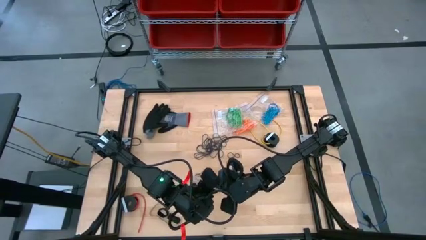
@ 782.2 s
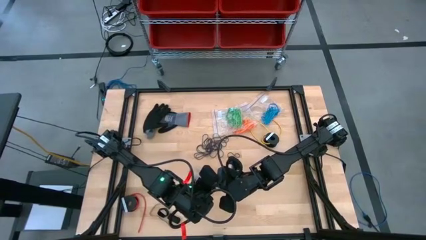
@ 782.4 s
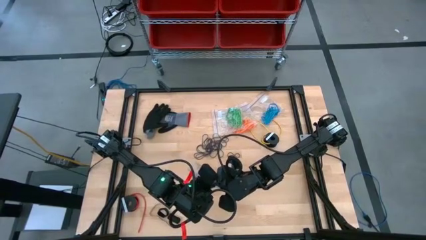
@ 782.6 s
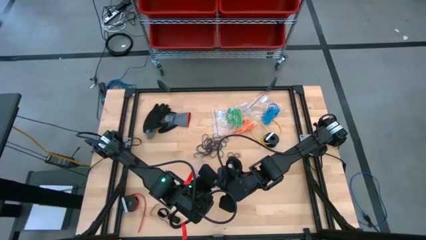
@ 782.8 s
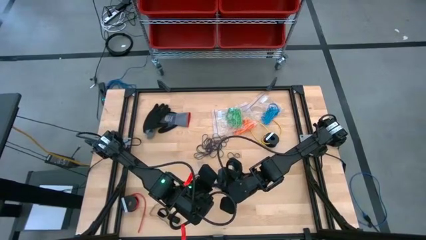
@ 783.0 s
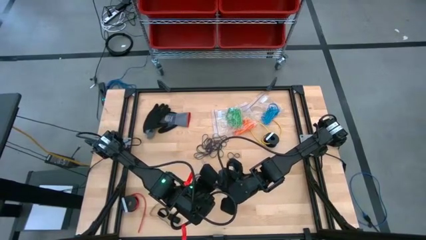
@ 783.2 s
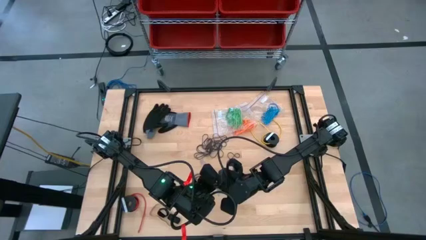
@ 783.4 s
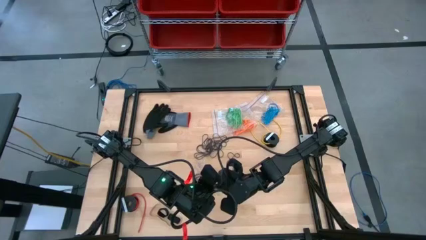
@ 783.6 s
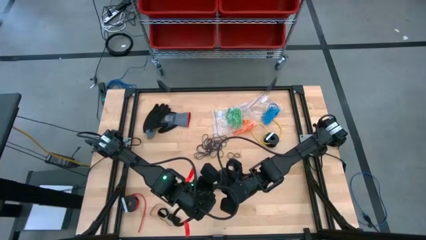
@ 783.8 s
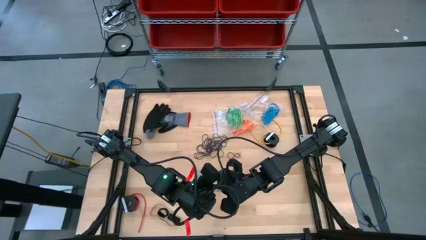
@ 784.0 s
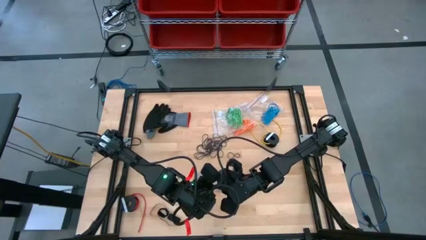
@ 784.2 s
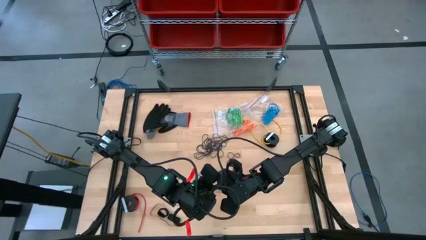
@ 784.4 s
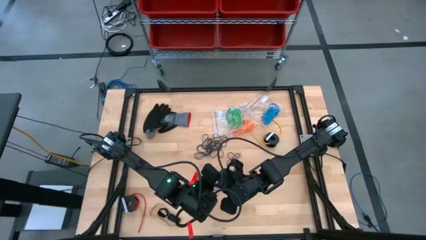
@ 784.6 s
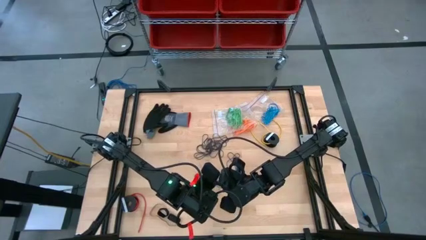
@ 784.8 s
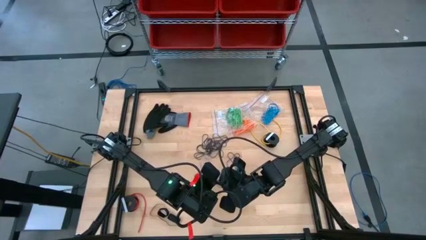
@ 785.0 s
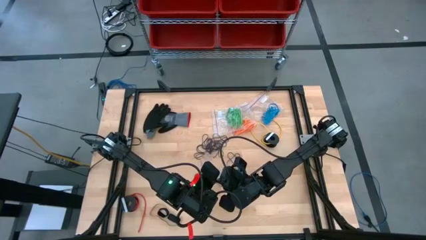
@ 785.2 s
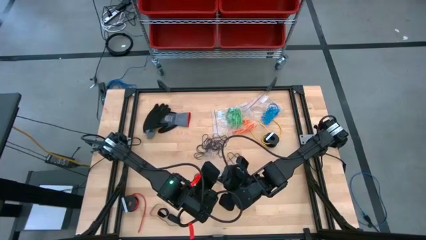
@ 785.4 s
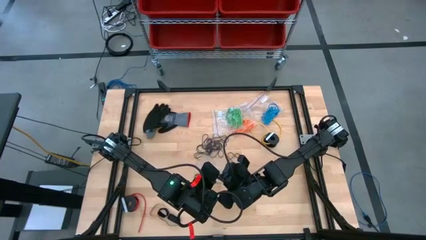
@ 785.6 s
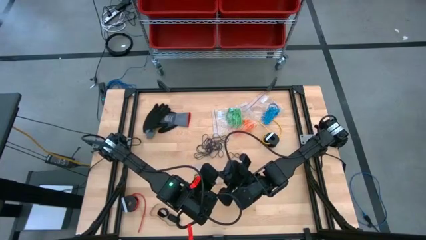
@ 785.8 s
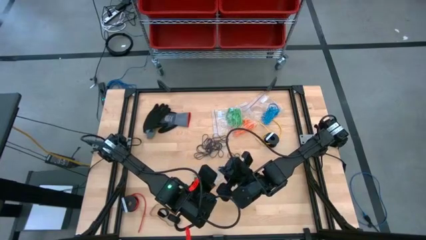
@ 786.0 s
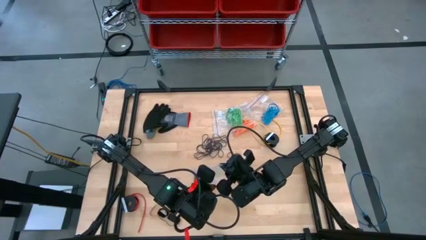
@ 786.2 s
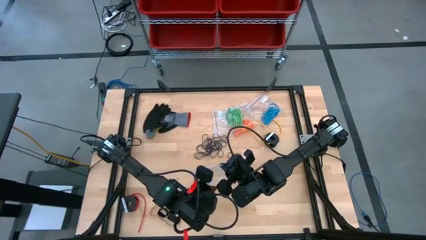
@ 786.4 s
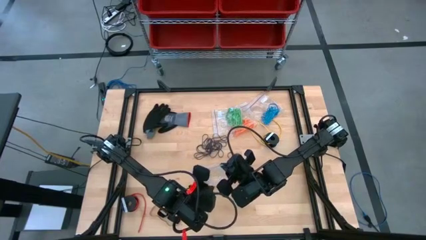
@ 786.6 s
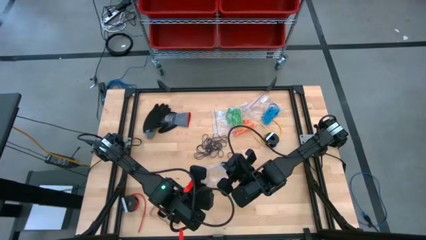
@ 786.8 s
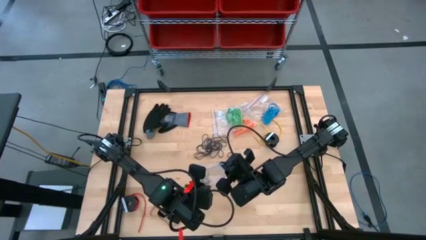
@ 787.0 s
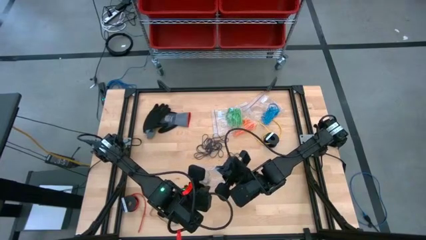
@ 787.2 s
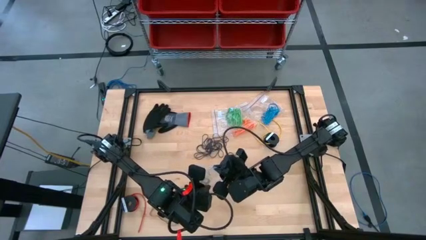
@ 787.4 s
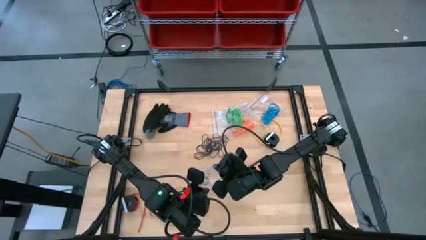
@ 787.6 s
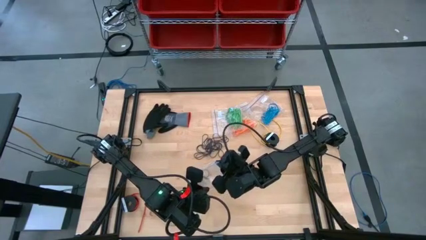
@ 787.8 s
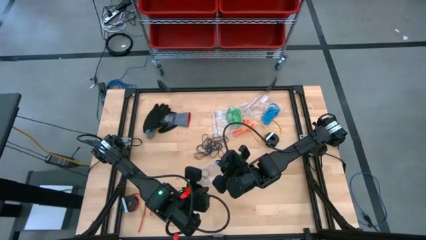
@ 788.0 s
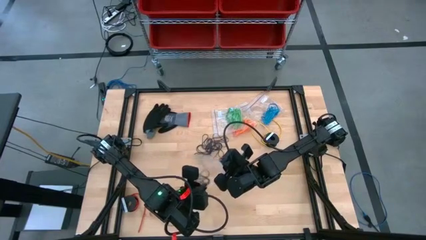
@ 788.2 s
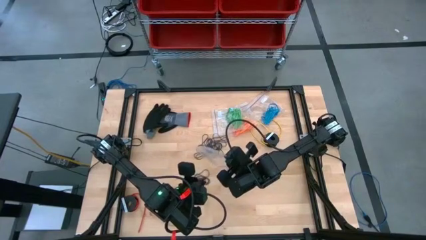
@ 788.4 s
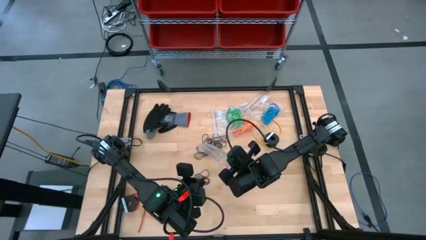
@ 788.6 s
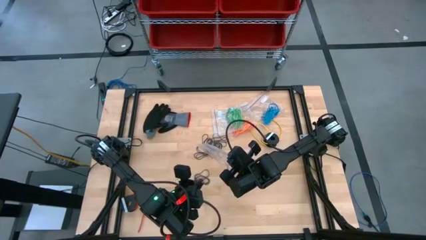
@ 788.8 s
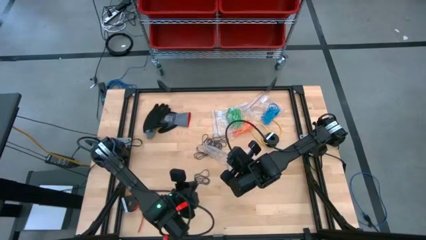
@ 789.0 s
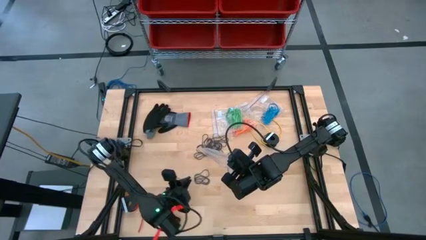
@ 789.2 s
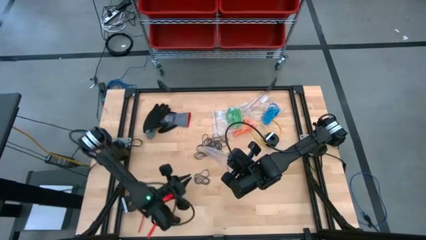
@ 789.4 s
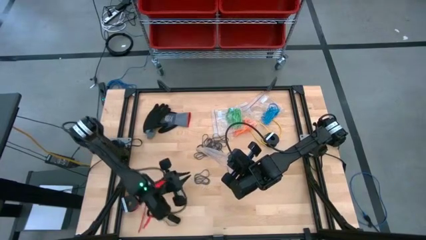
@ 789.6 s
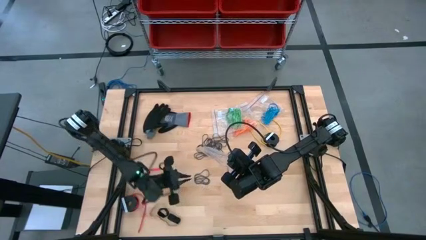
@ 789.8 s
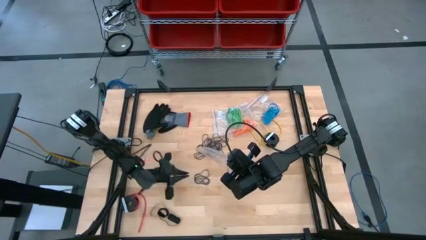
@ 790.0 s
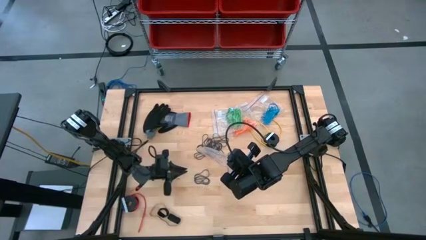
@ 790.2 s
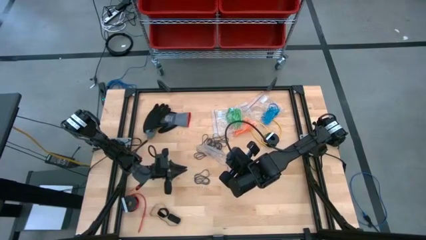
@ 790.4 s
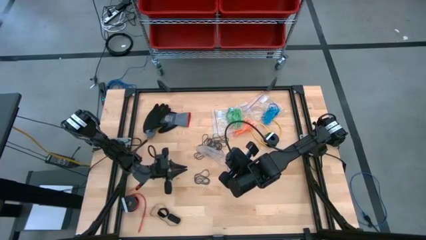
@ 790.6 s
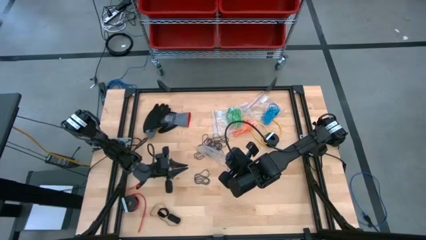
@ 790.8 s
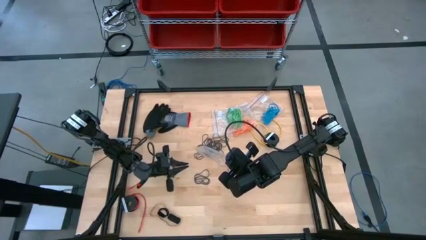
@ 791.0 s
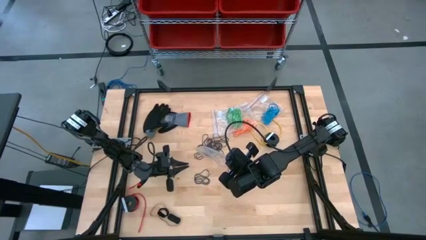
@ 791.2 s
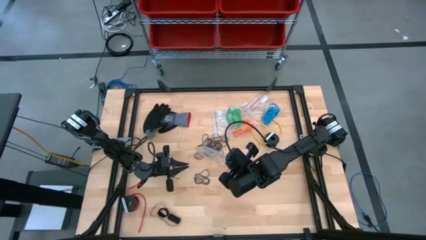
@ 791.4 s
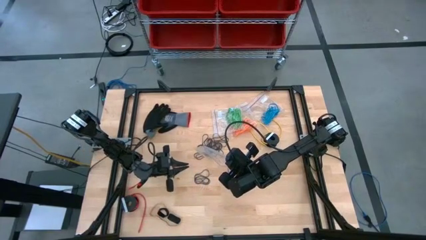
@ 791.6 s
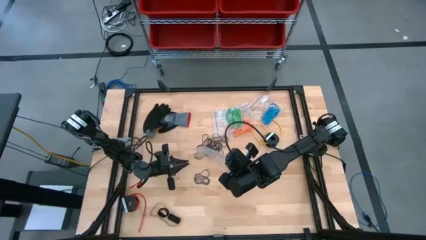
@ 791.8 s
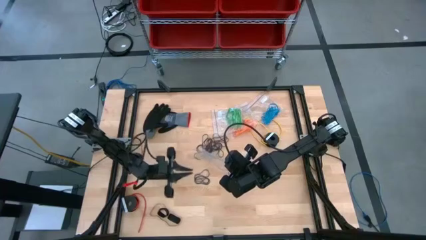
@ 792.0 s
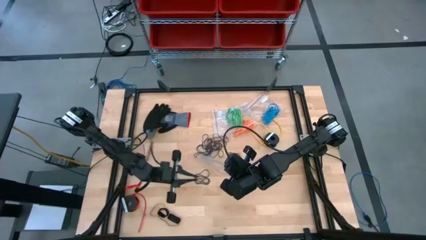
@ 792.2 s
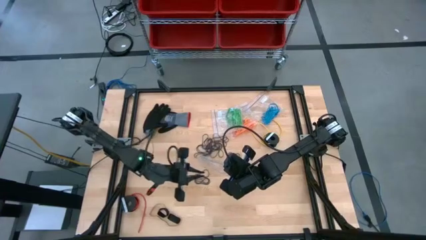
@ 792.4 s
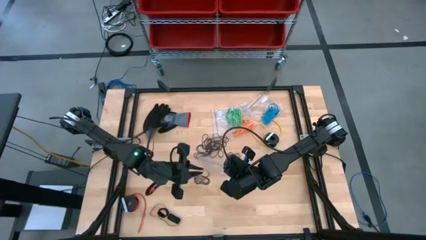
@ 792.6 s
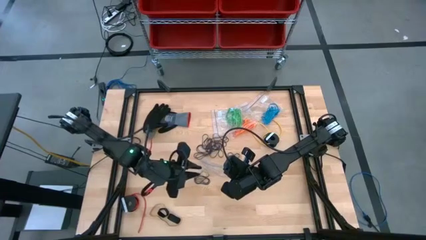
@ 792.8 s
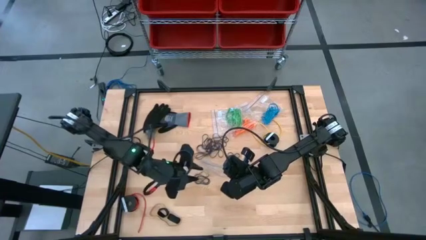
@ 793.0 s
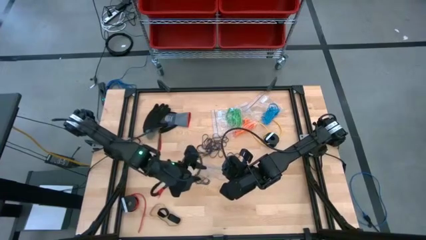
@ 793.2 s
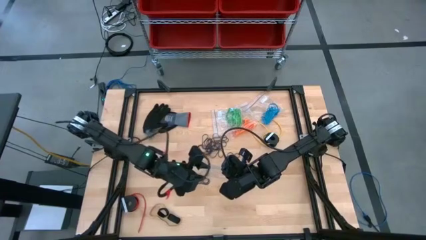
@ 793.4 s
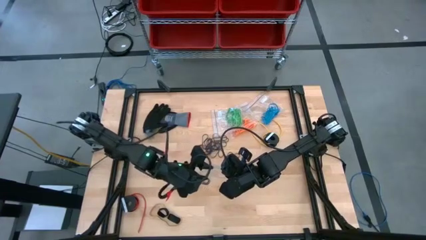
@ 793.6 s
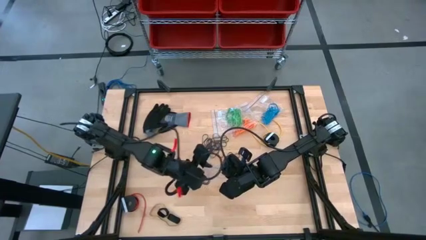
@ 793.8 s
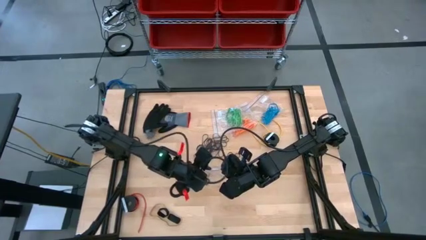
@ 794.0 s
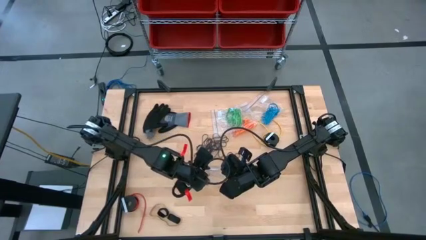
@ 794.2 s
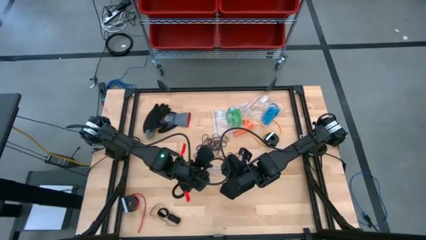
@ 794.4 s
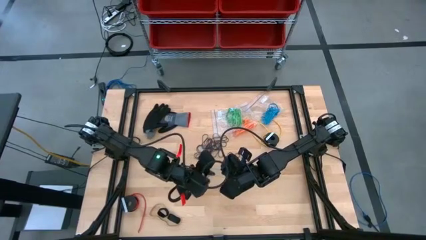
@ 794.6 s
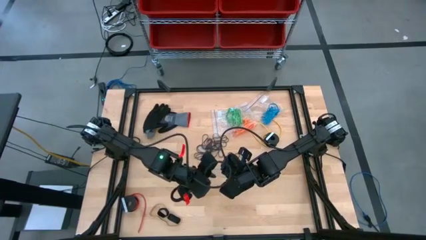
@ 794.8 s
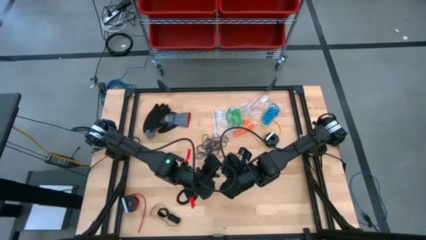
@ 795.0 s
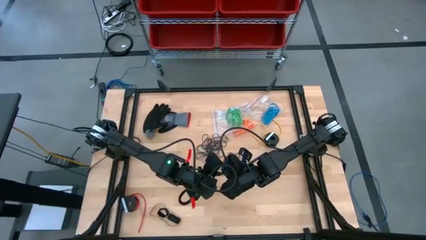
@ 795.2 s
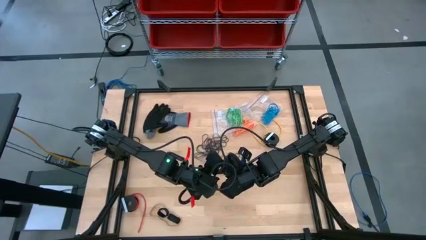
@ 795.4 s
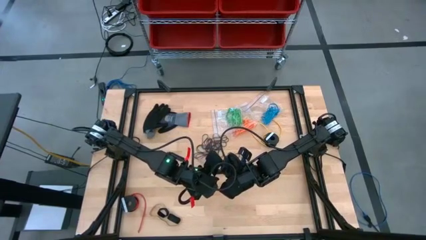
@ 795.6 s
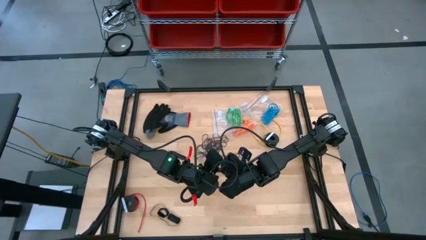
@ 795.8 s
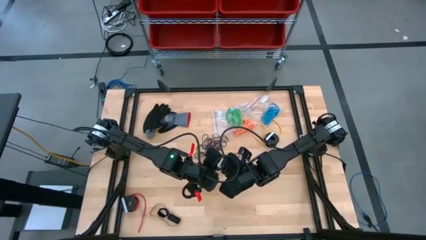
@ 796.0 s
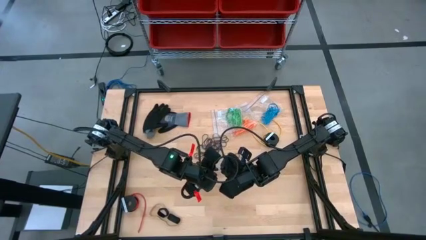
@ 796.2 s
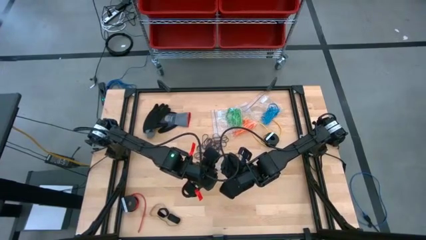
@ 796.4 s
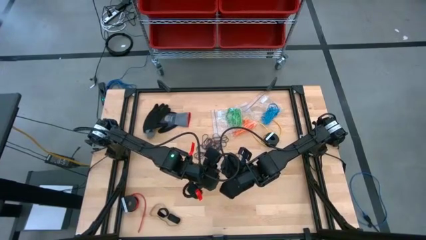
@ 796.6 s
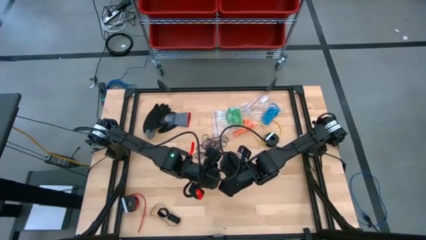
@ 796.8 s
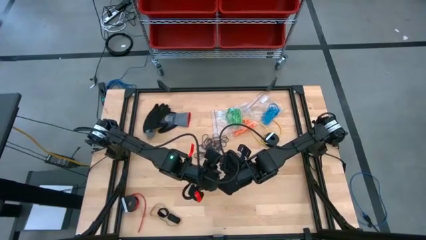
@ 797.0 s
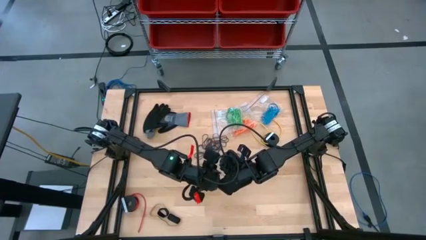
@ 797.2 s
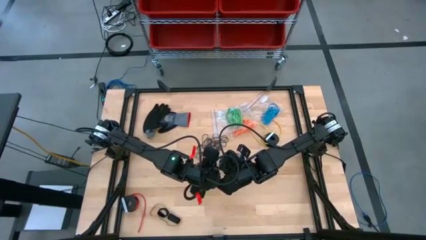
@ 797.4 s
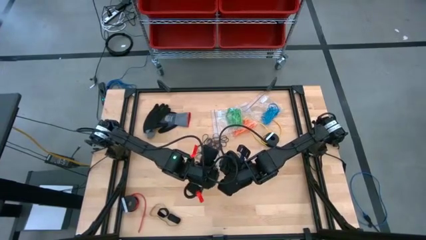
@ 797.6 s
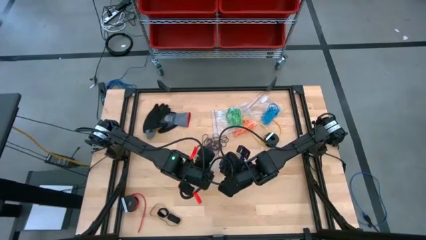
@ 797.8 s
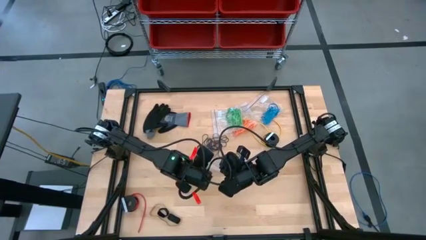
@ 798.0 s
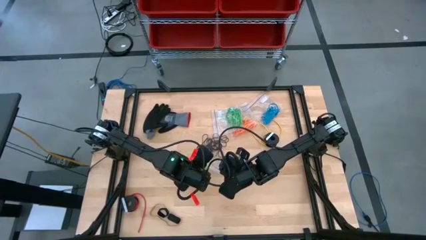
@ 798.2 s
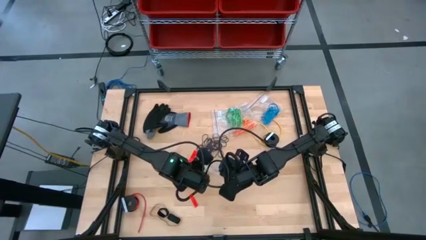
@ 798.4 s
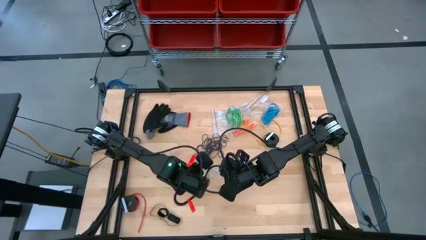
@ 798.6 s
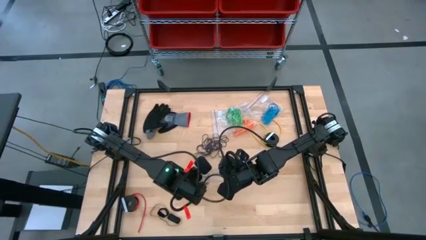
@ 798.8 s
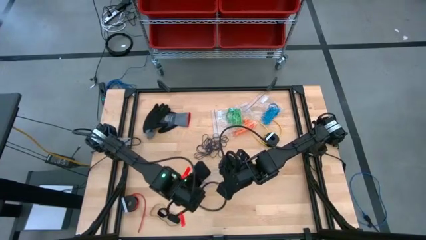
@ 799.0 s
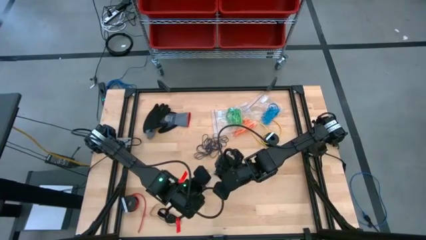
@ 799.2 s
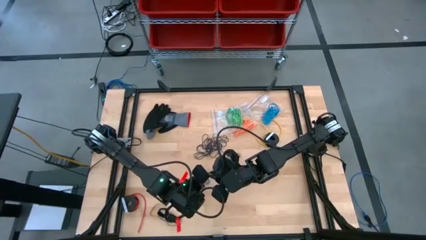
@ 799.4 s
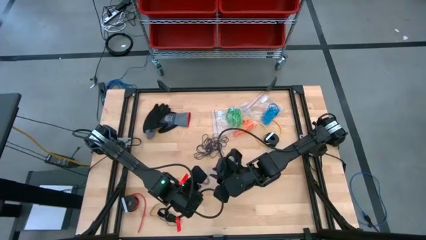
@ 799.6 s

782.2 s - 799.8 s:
Task: Sort rubber bands
Open the transparent zip bag
